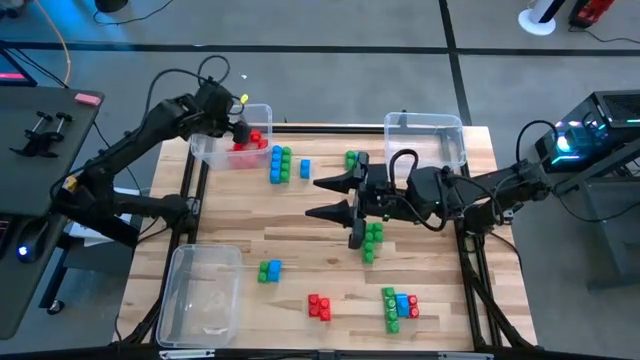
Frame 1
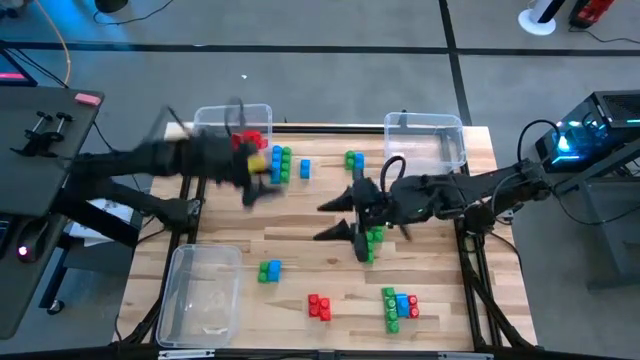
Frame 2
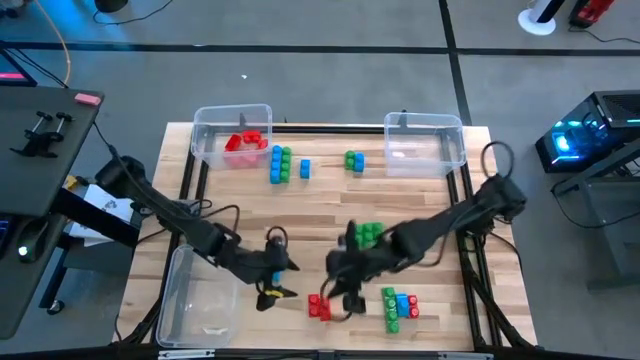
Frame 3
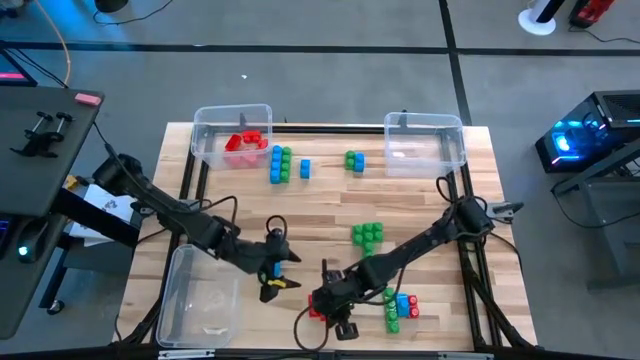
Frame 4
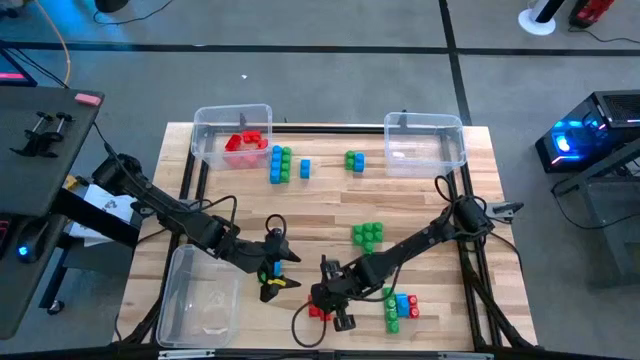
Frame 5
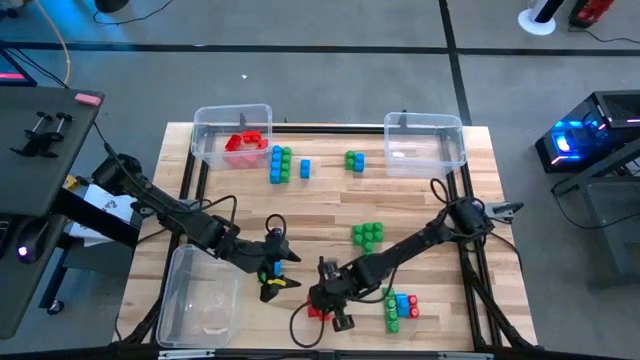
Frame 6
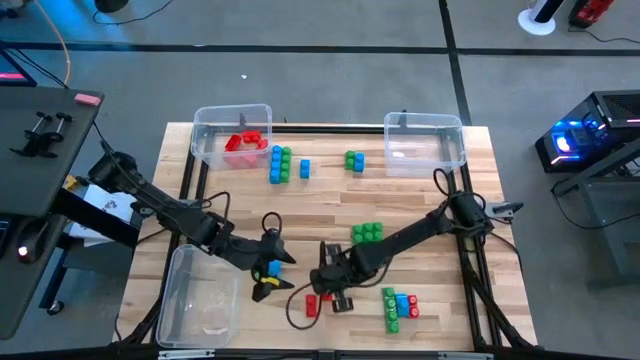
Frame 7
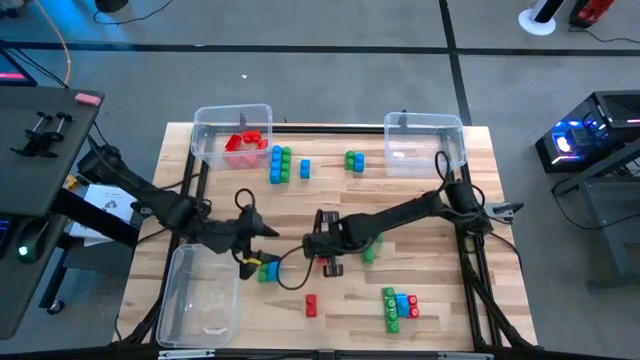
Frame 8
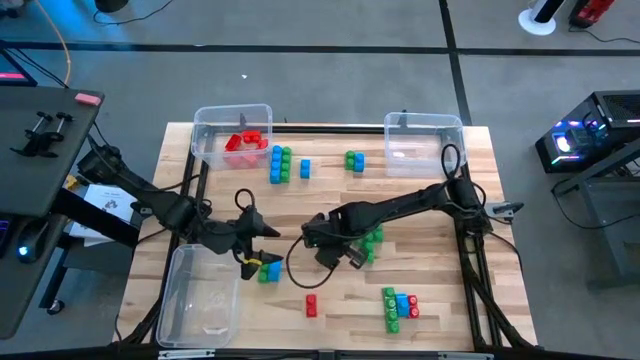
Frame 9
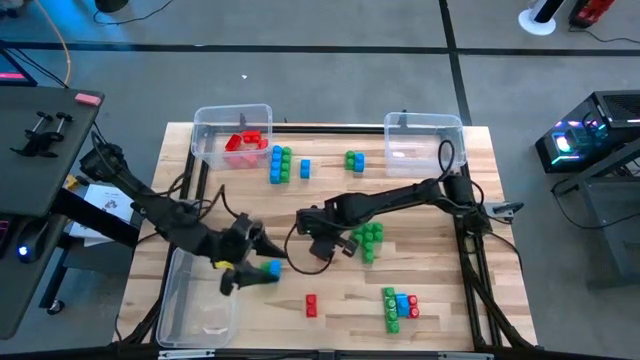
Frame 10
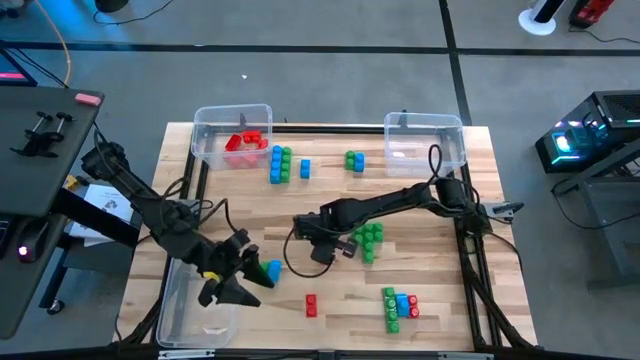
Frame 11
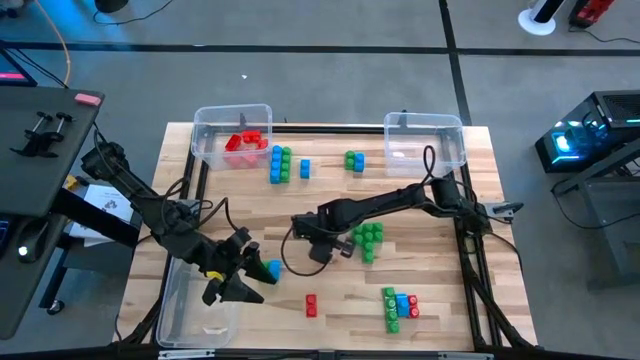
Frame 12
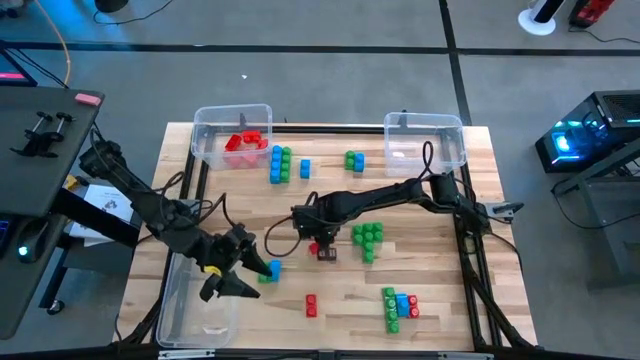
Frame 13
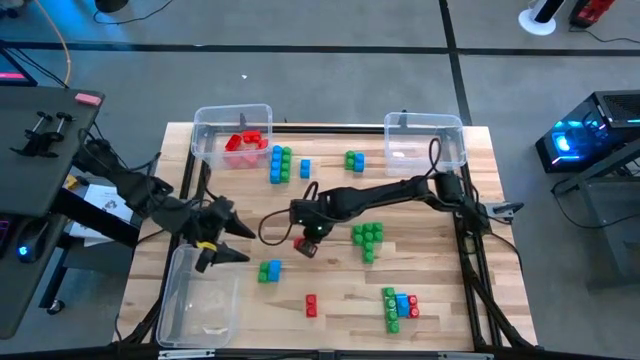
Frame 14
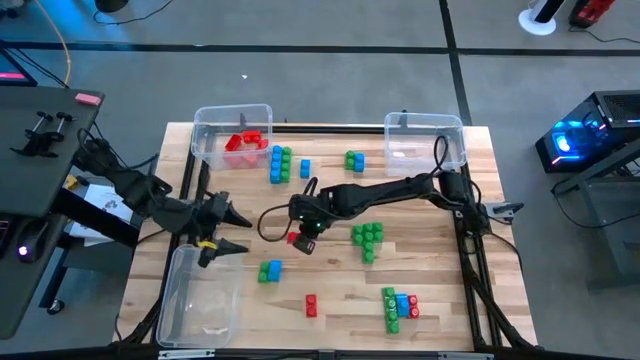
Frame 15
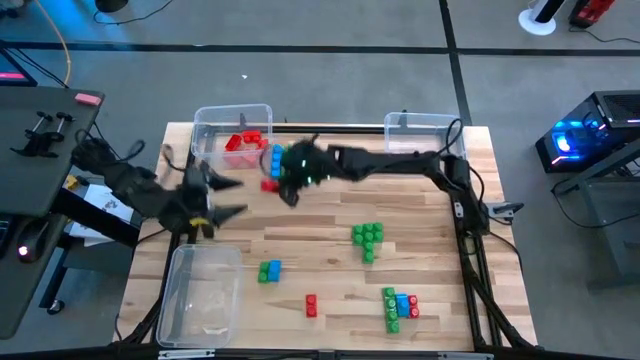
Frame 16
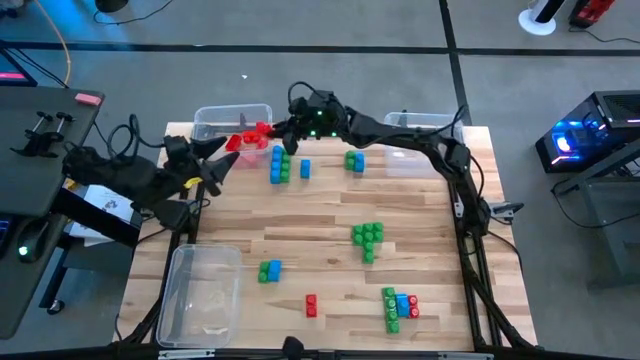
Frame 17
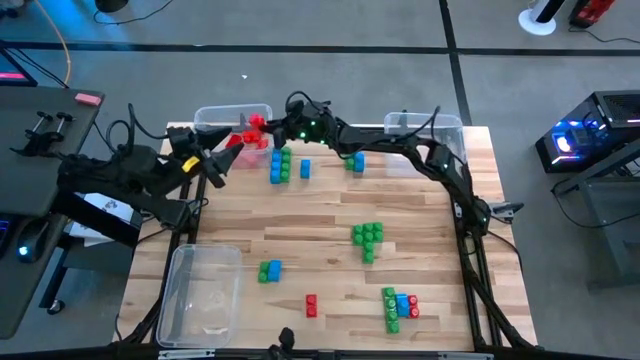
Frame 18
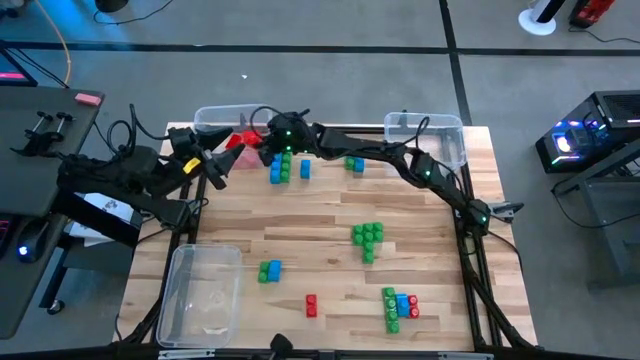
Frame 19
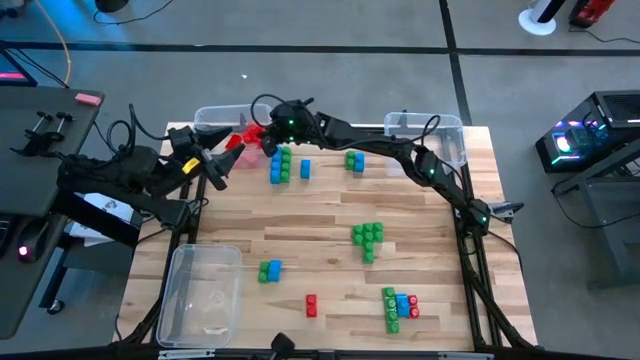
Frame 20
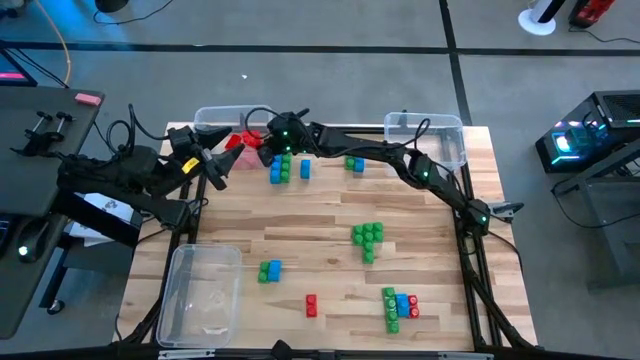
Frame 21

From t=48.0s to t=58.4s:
Task: Sort blocks
Put the red game piece into the top left transparent bin

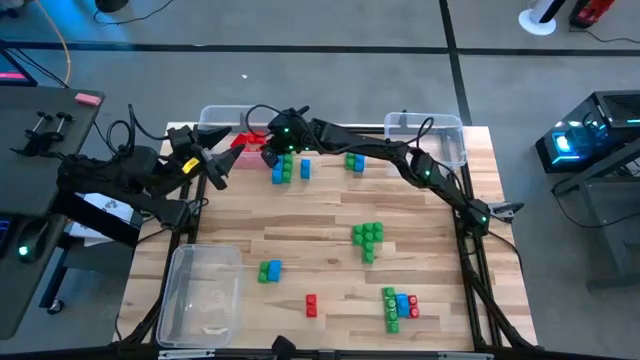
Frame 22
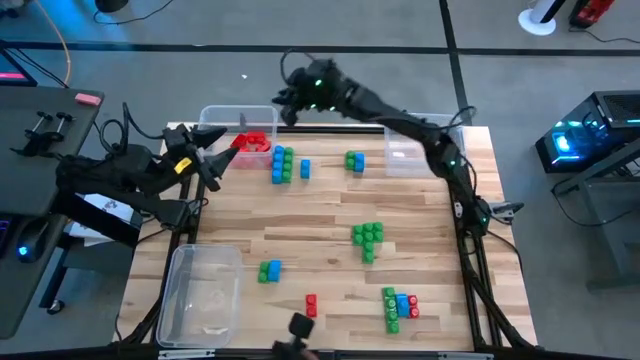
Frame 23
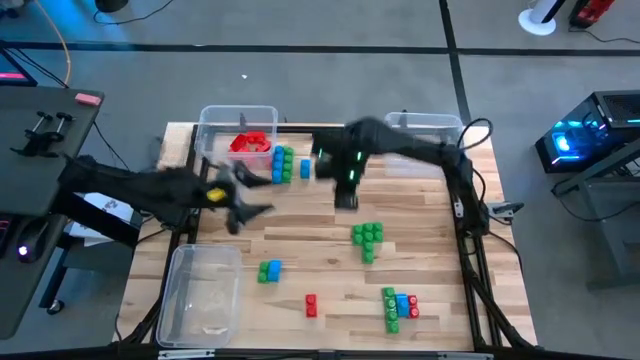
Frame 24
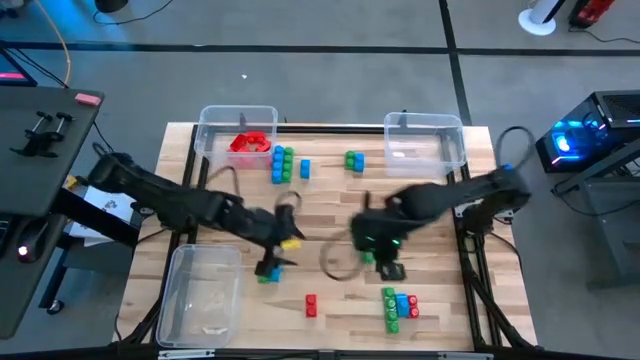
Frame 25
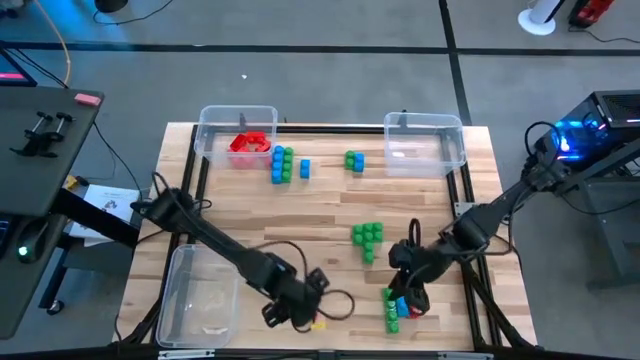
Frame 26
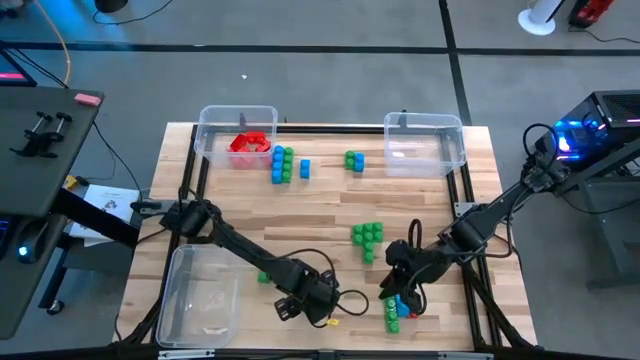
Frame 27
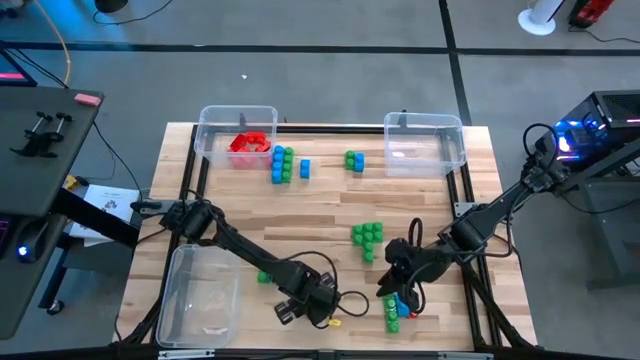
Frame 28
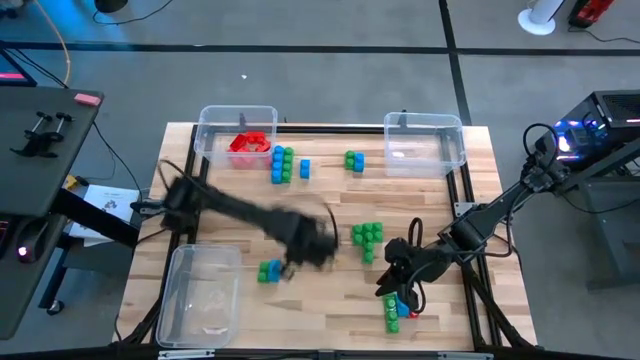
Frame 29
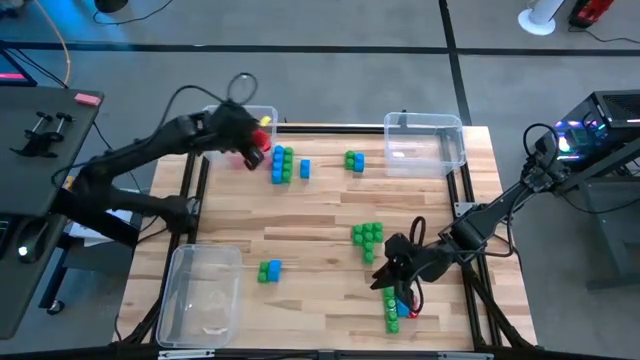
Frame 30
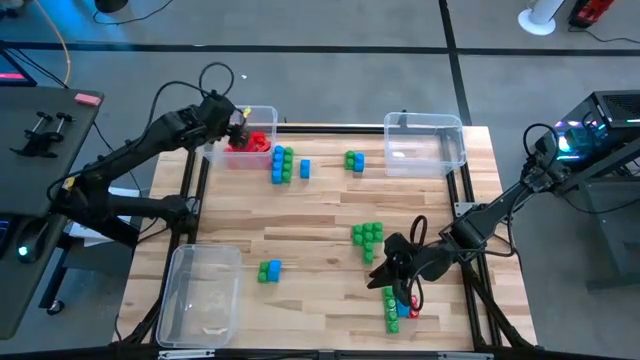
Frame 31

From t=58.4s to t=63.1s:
Put the red game piece into the top left transparent bin

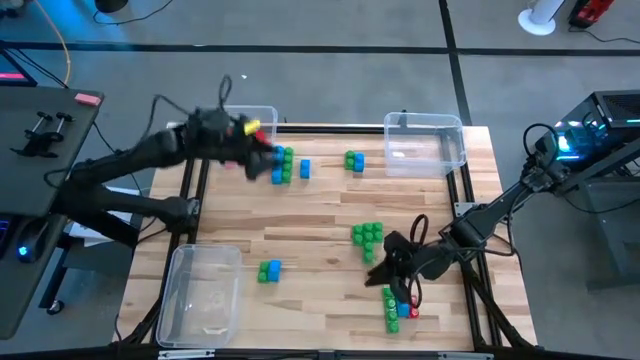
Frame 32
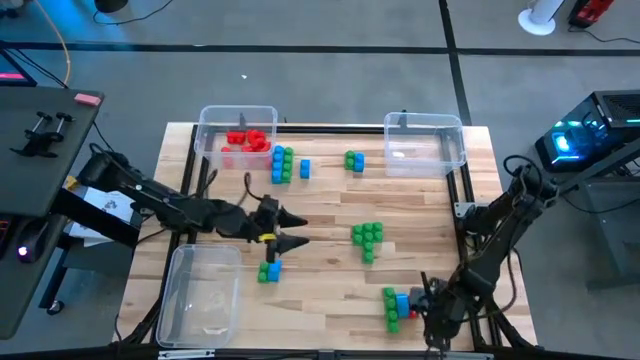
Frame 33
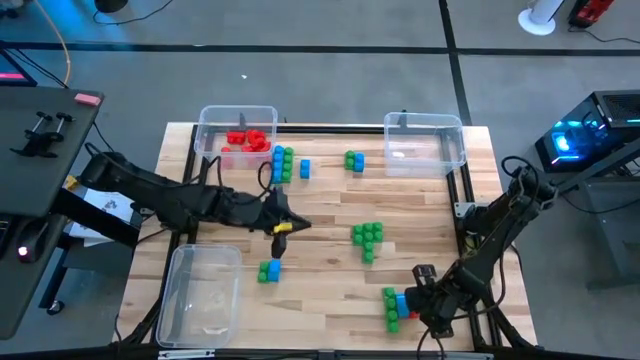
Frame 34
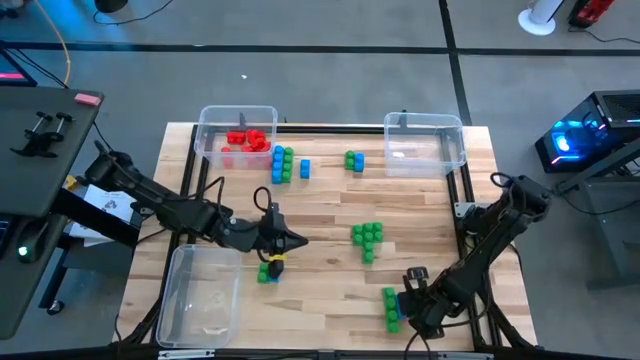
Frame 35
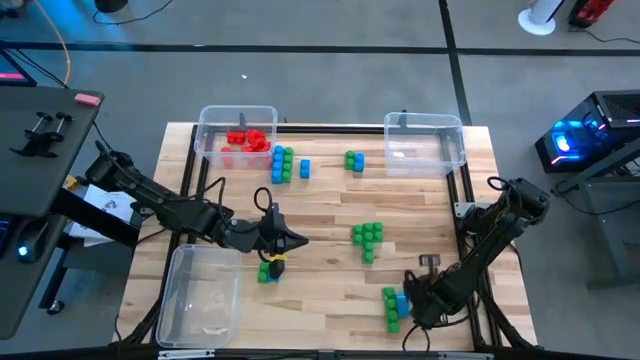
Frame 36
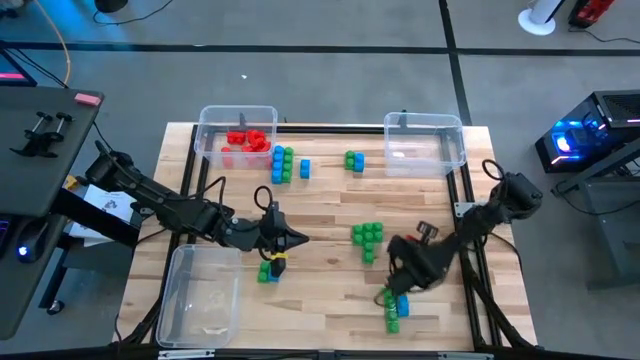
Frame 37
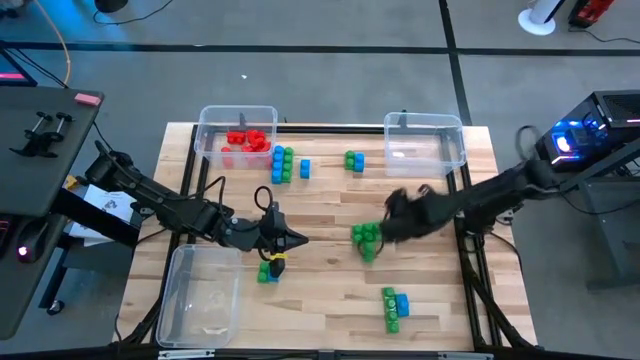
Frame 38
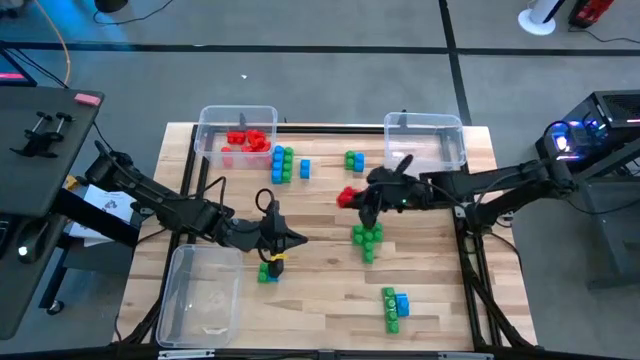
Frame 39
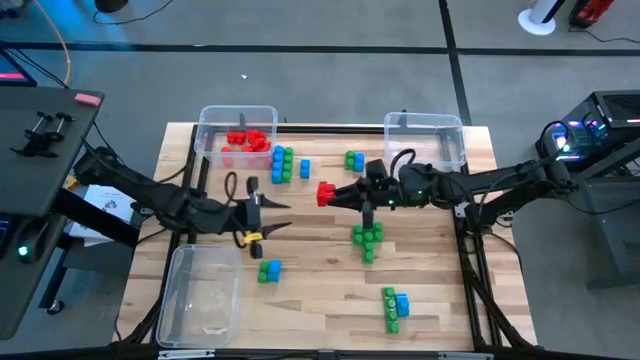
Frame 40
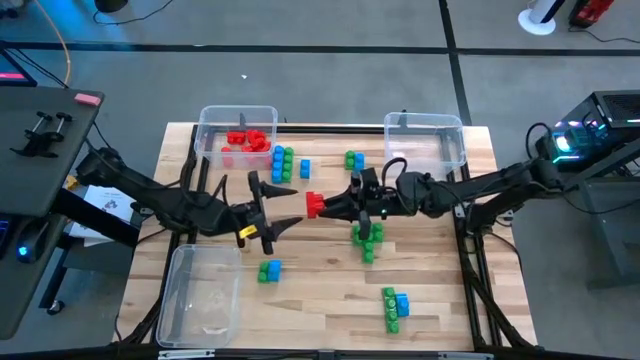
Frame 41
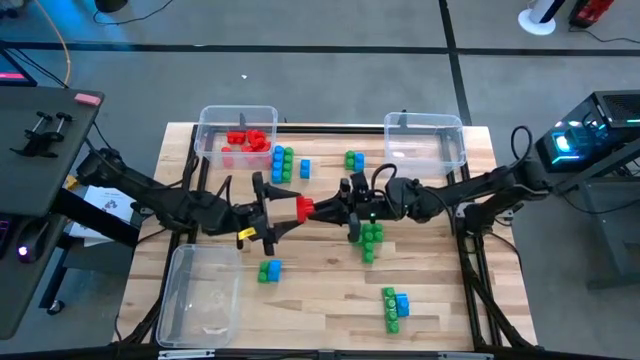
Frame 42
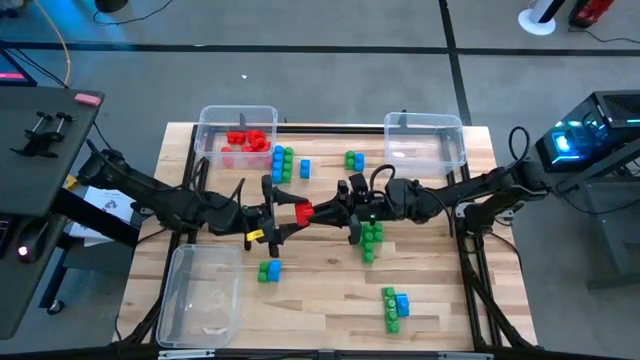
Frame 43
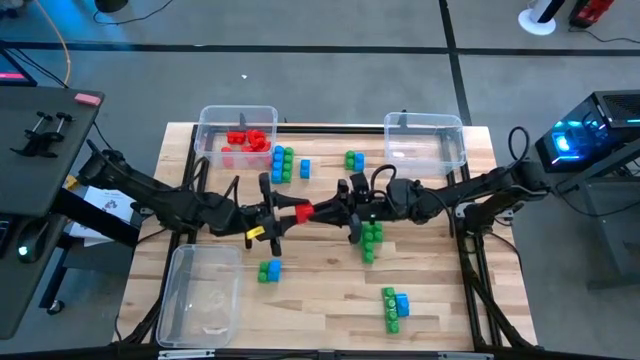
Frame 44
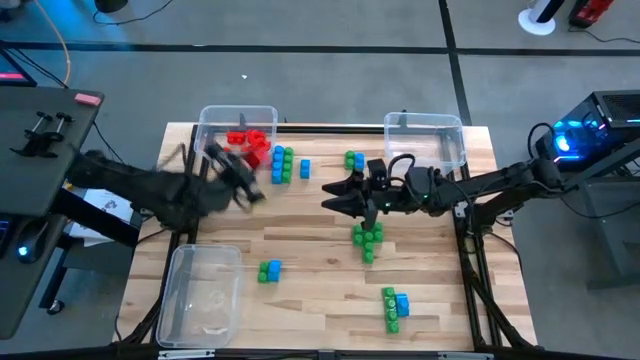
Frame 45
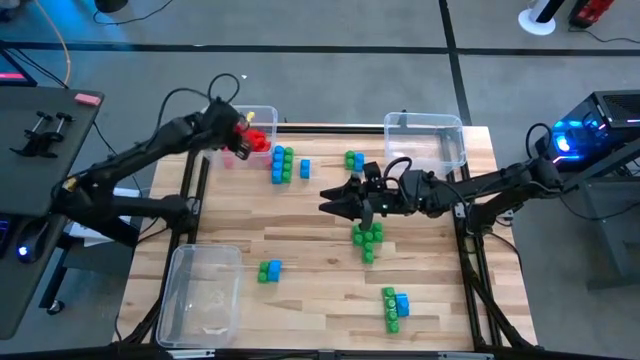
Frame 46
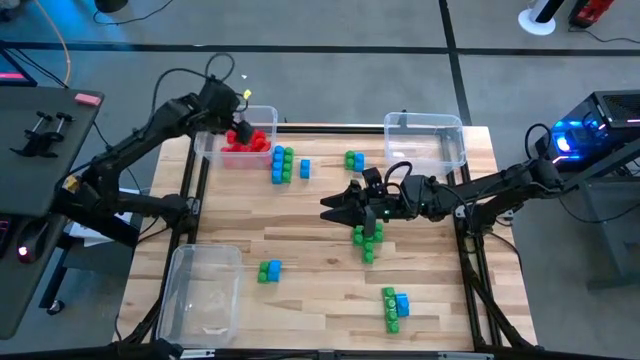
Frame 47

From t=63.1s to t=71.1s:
Put the red game piece into the top left transparent bin
